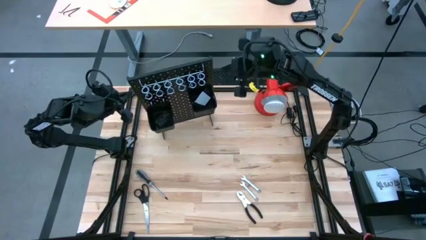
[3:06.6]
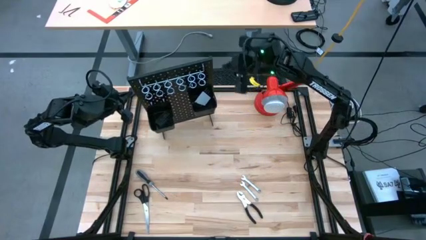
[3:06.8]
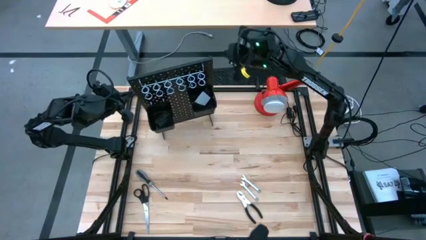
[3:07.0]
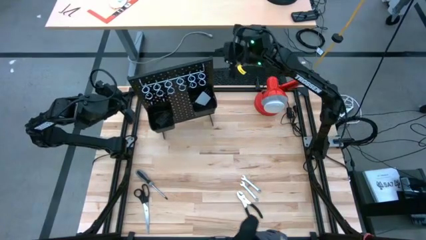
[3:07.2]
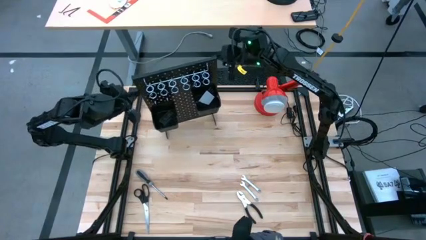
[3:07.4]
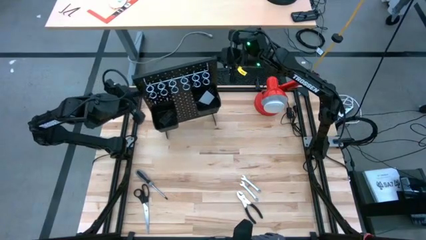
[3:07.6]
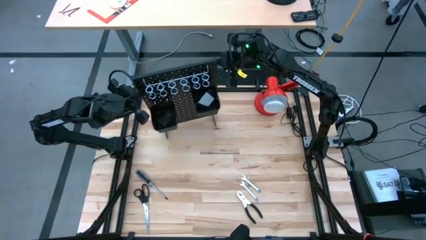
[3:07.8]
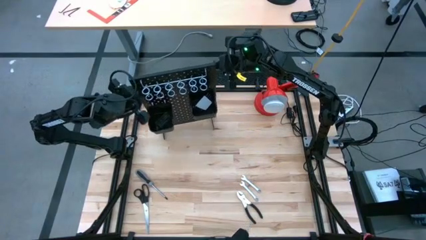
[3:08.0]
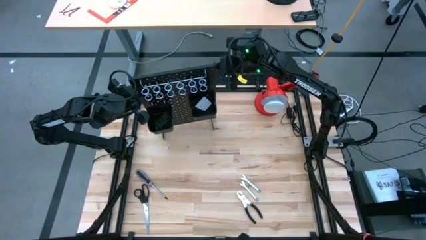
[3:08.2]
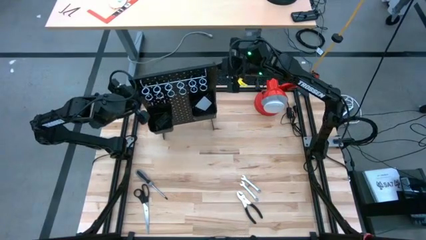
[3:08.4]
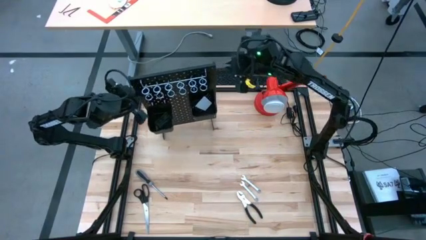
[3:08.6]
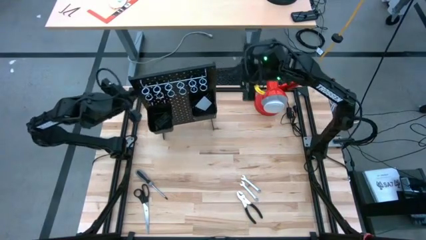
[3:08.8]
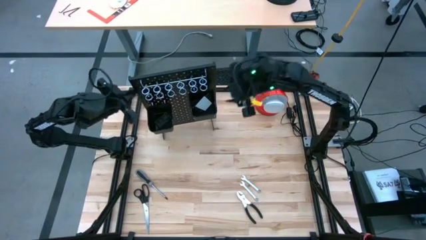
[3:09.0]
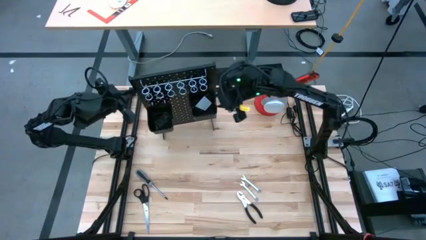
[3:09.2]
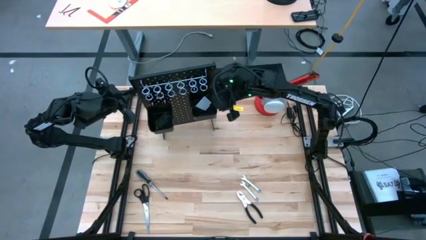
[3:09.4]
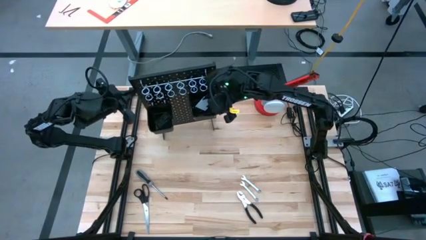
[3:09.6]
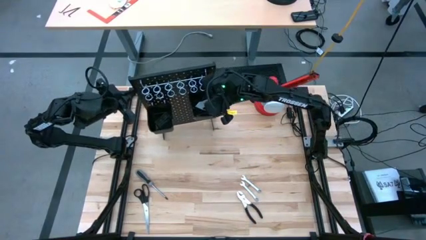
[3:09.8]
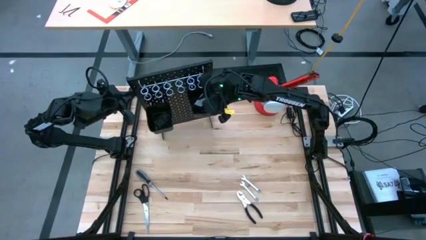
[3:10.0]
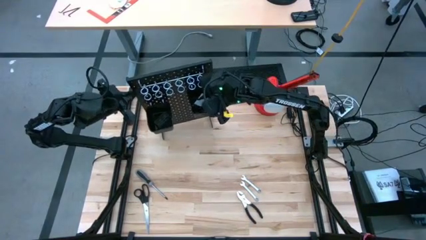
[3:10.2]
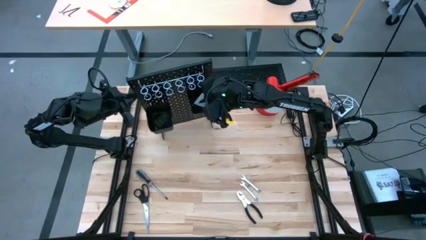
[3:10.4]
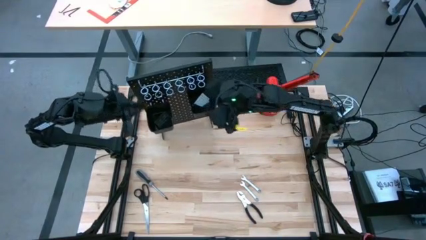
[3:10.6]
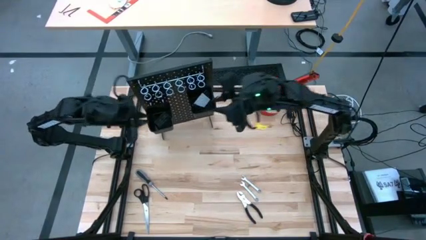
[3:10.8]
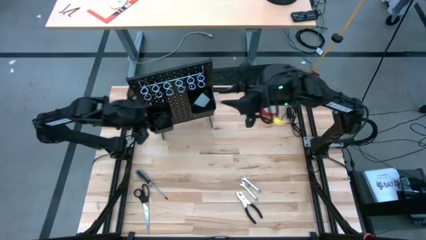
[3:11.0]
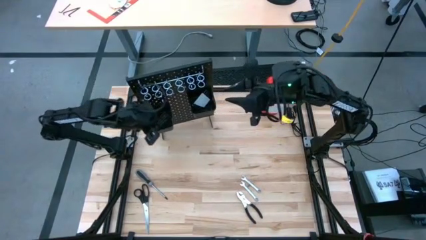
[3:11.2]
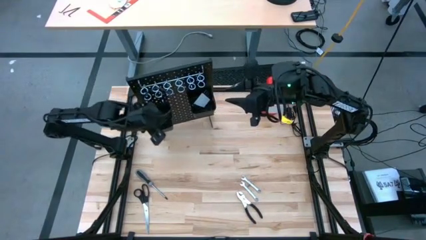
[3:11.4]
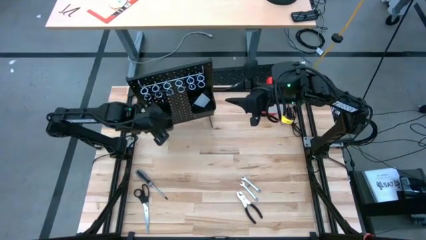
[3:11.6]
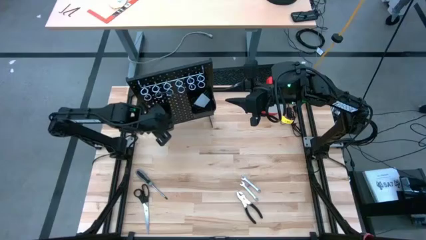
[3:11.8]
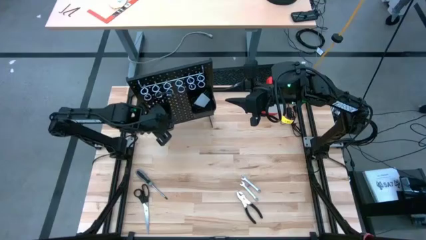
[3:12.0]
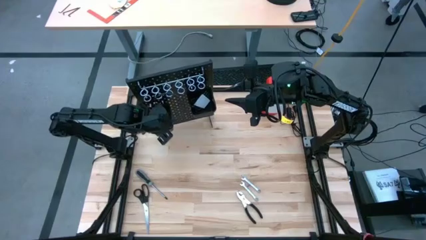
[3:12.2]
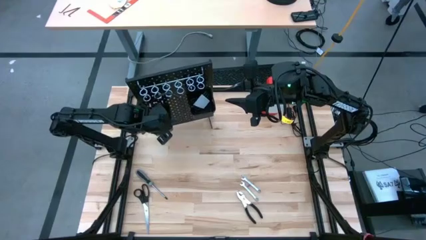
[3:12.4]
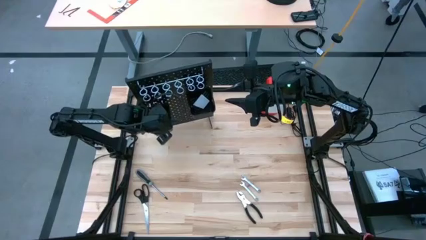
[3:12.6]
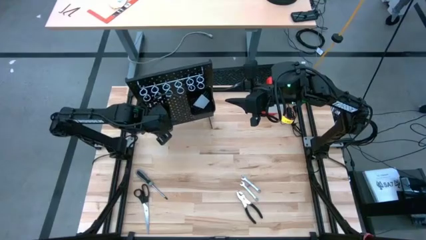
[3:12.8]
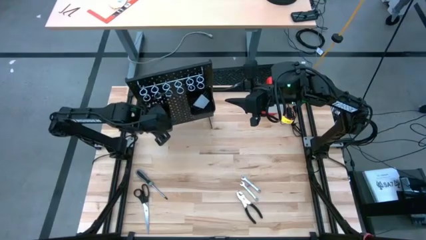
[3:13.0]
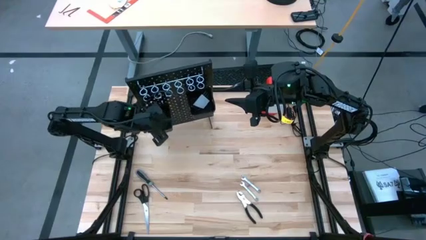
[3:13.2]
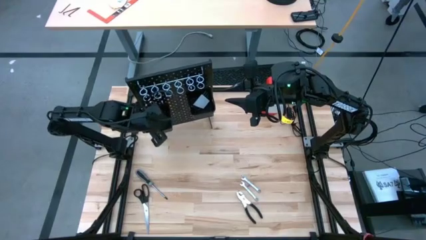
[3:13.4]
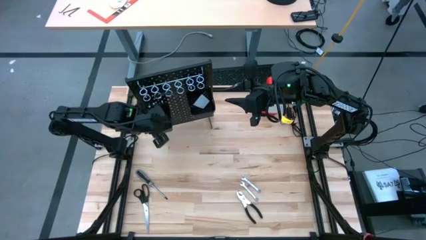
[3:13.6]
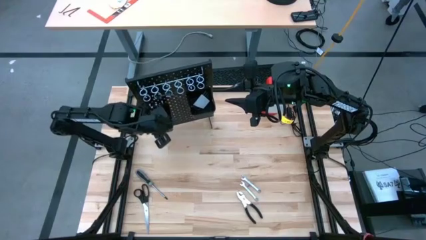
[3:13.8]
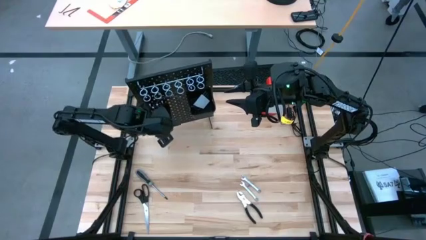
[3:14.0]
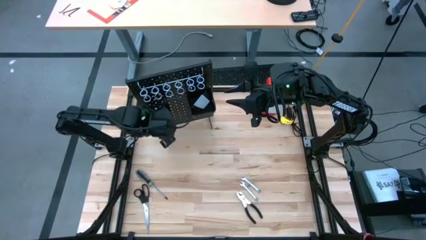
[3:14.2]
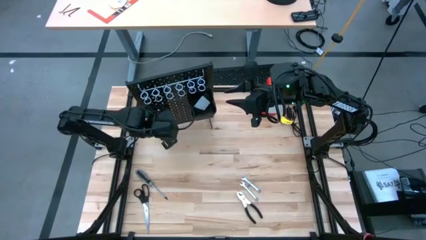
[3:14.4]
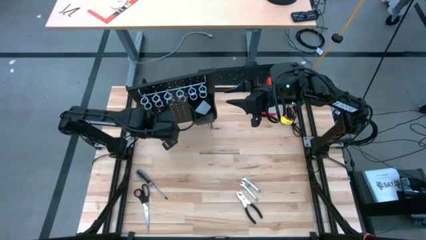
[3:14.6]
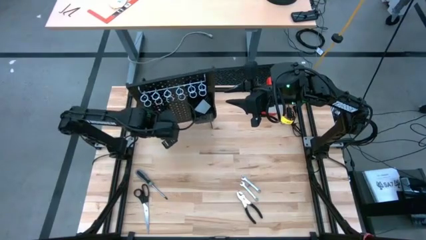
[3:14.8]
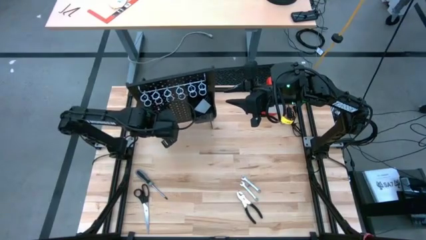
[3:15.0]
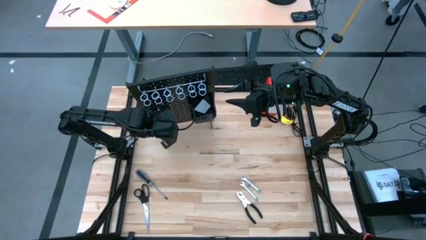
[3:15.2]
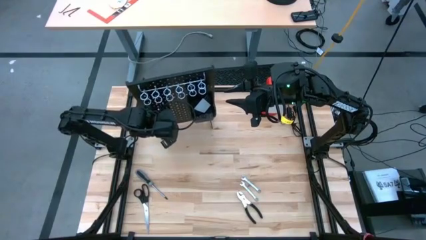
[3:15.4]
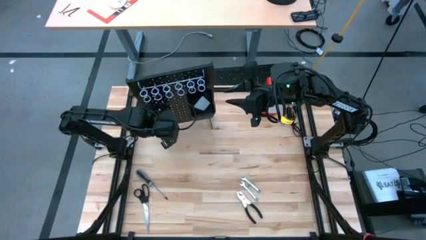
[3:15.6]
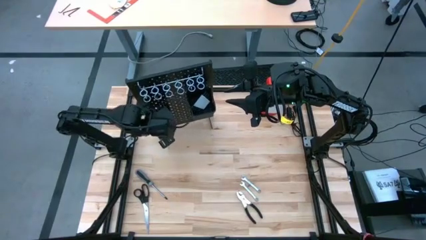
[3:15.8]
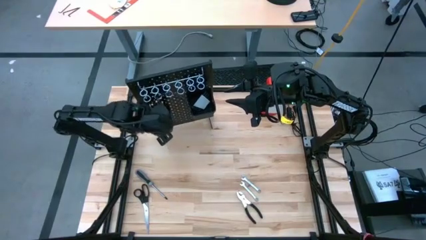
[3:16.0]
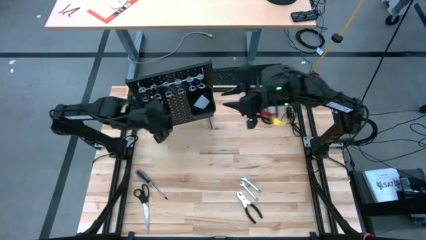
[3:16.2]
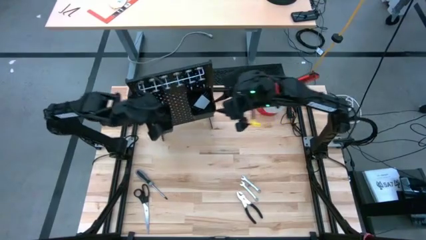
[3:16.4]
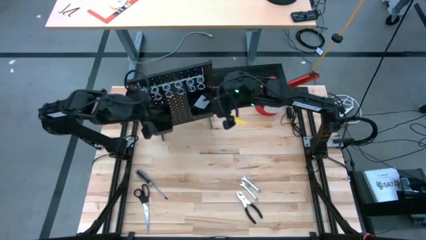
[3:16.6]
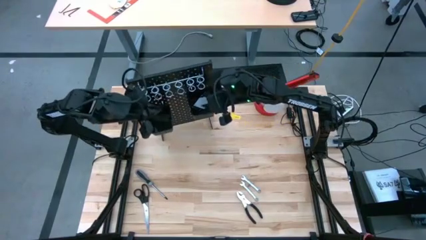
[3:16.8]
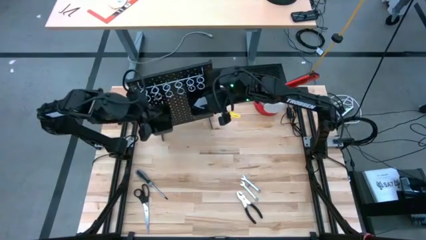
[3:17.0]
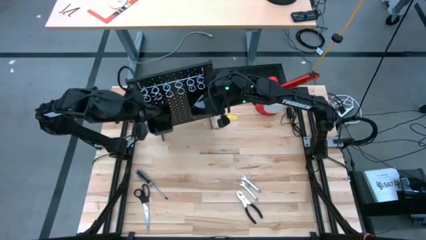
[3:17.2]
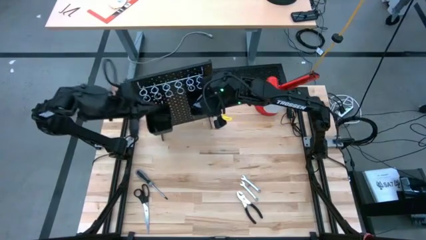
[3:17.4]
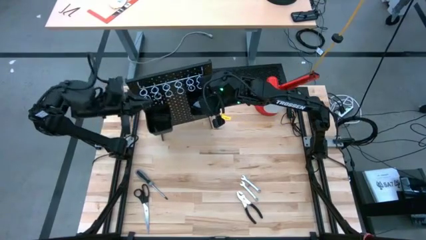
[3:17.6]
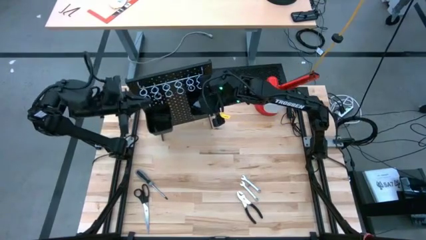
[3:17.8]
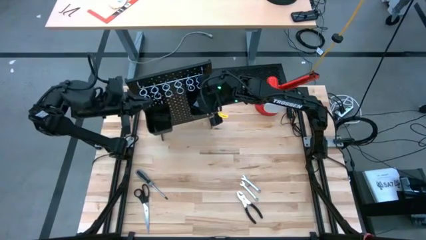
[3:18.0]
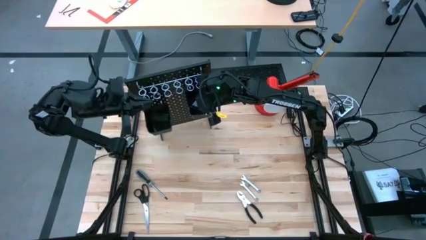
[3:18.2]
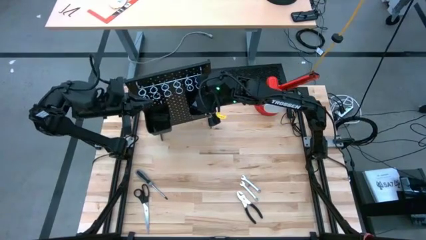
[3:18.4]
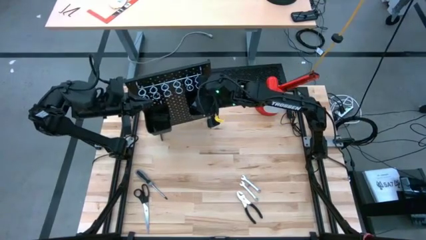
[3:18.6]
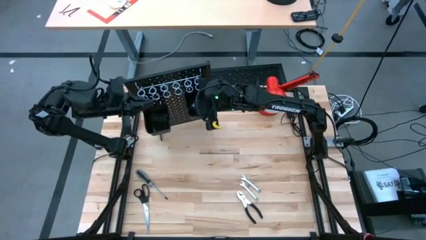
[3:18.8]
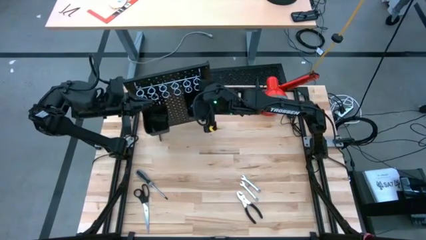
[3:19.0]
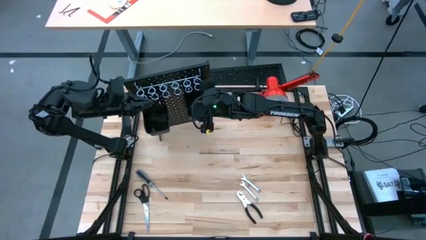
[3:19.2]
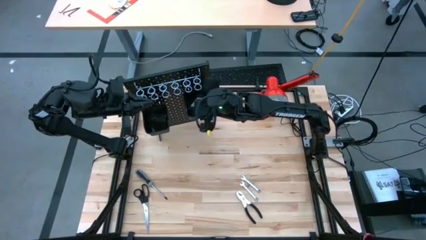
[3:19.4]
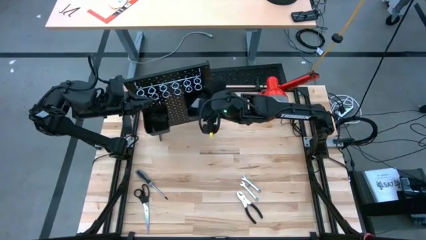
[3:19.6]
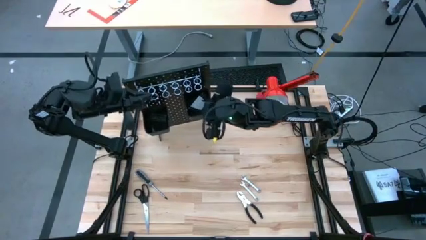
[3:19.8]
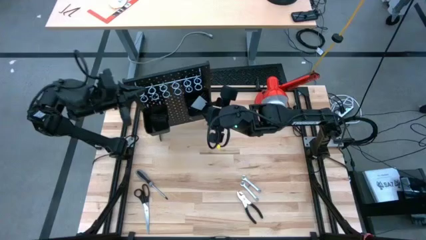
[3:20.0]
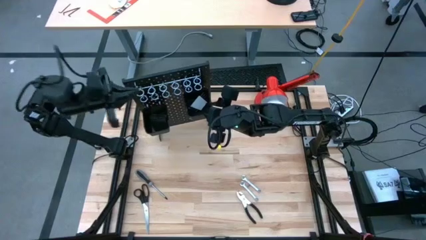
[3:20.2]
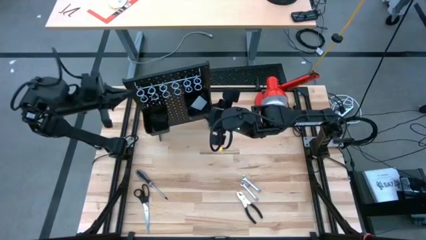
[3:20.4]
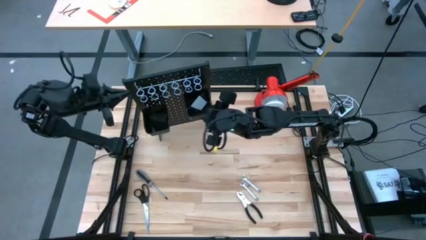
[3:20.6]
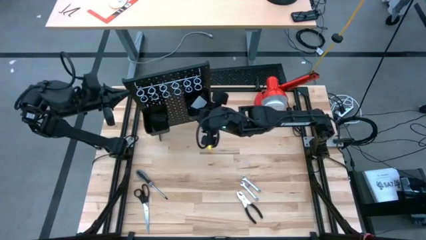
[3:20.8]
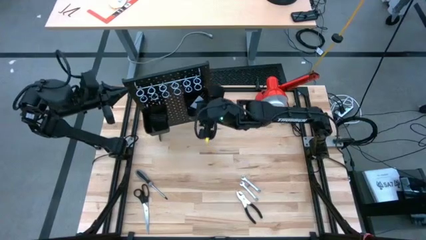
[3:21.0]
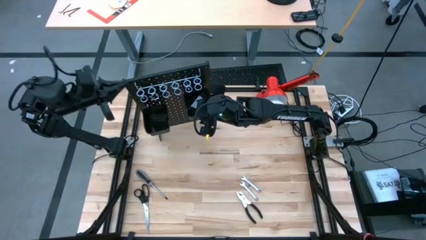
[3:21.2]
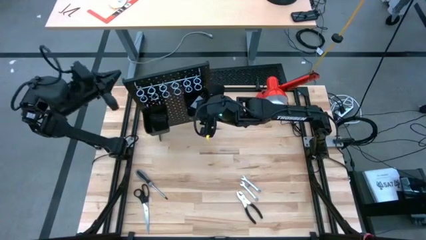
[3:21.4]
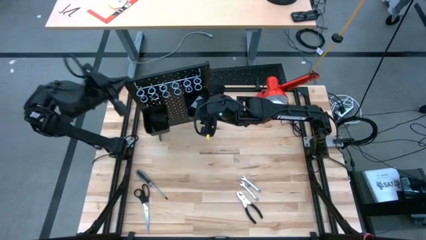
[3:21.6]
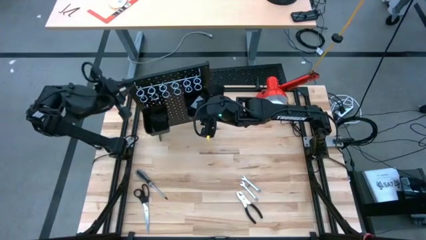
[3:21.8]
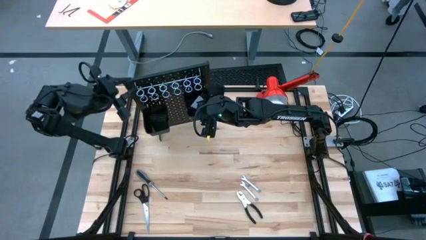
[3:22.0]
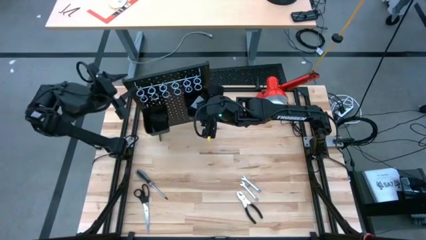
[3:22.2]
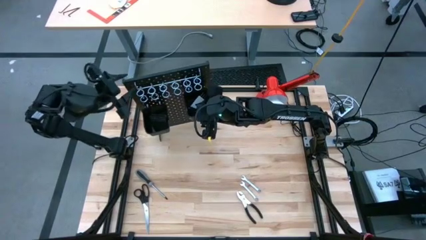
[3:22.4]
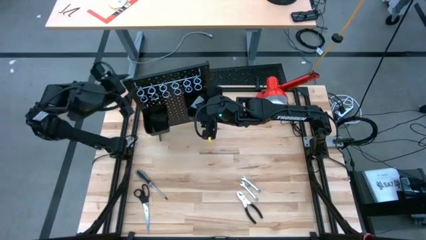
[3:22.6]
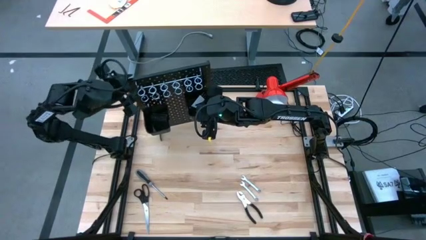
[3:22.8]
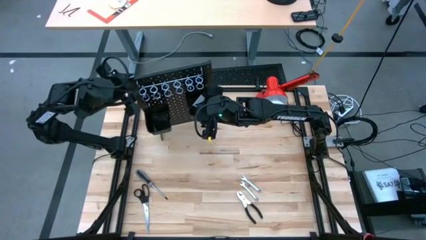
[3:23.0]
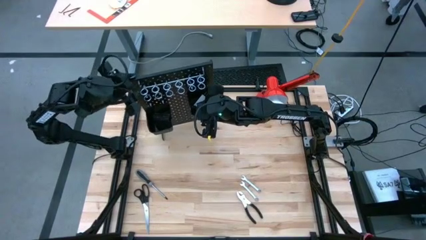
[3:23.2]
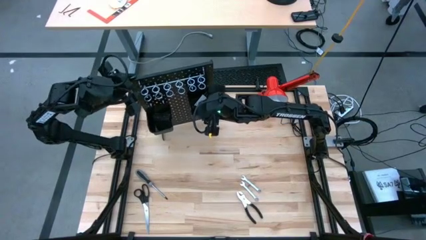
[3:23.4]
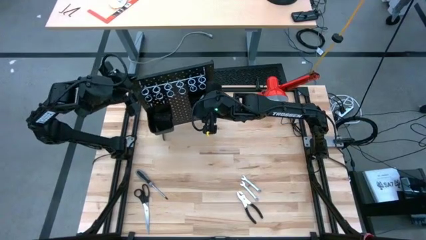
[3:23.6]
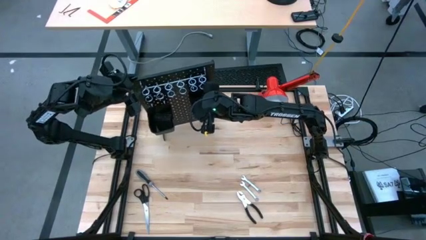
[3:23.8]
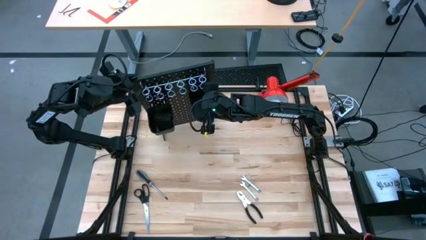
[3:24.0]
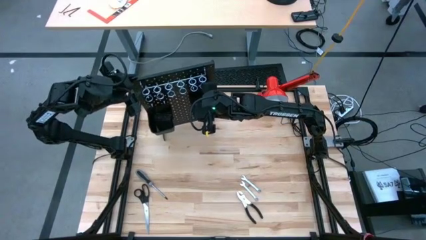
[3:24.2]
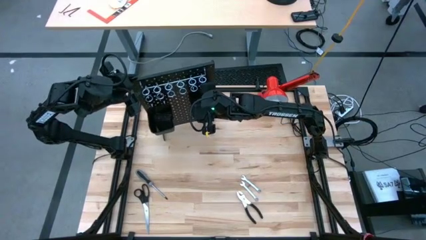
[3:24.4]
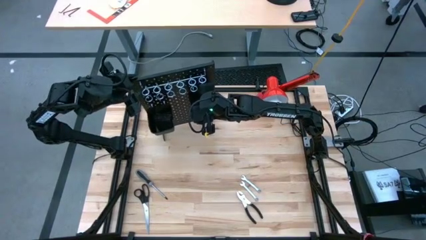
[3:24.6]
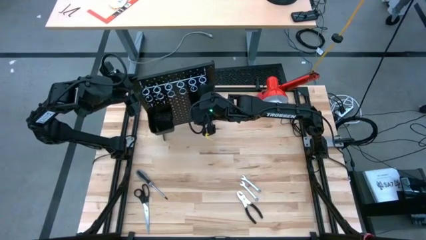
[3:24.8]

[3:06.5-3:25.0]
Task: Hang tools onto peg board
Remove the black allen wrench set from the top black basket on the pegboard to the table
